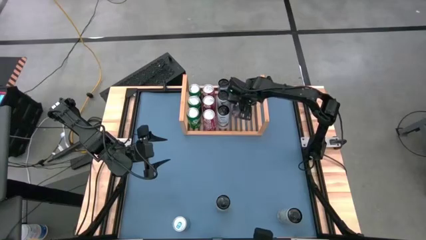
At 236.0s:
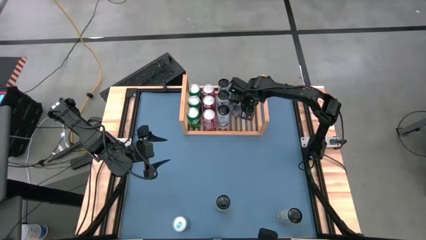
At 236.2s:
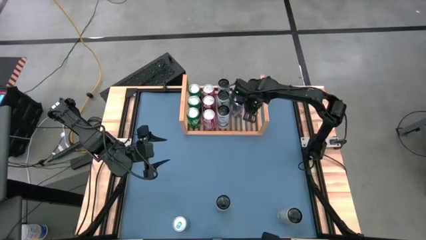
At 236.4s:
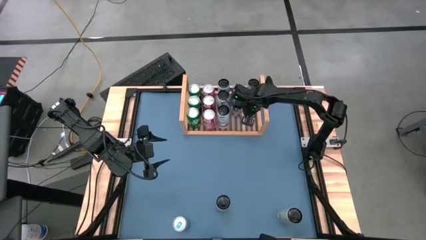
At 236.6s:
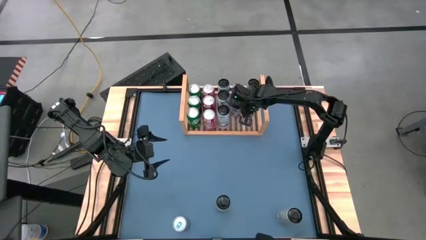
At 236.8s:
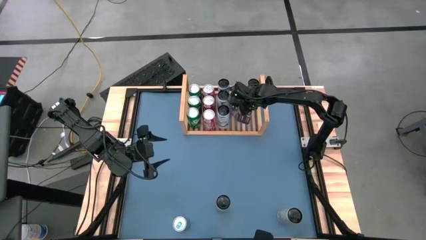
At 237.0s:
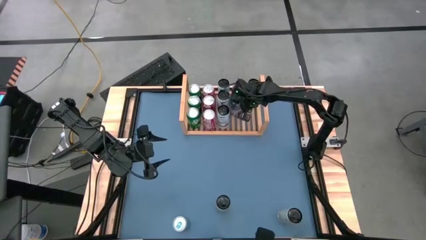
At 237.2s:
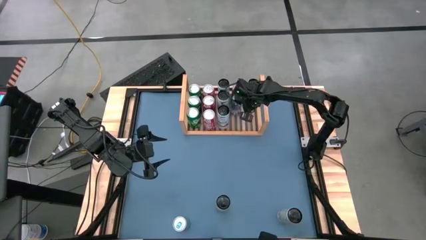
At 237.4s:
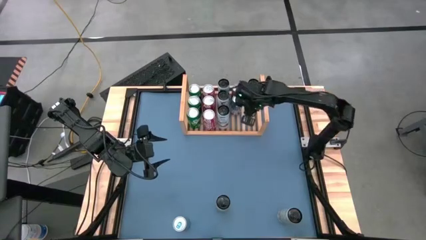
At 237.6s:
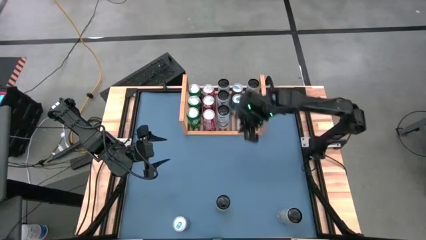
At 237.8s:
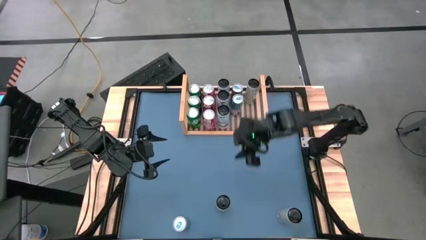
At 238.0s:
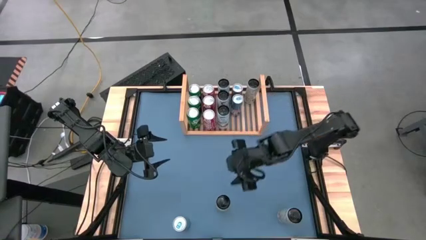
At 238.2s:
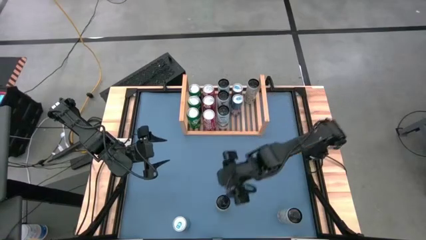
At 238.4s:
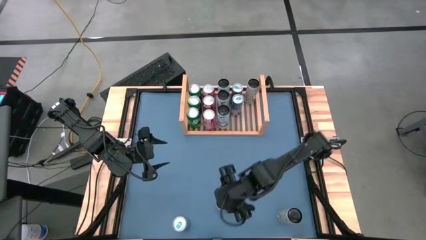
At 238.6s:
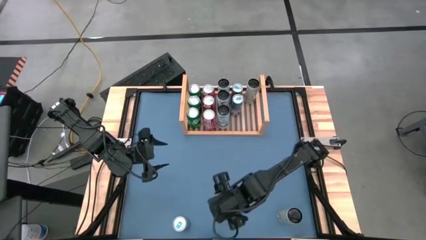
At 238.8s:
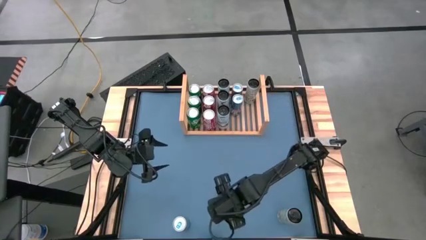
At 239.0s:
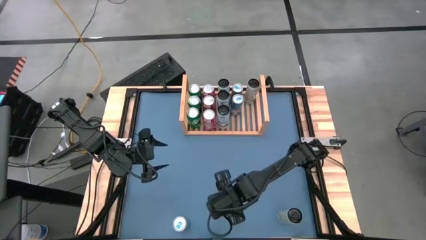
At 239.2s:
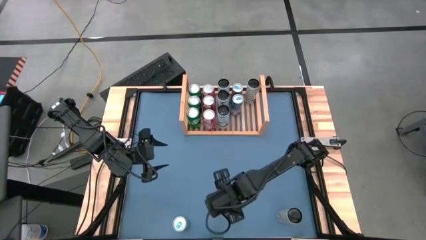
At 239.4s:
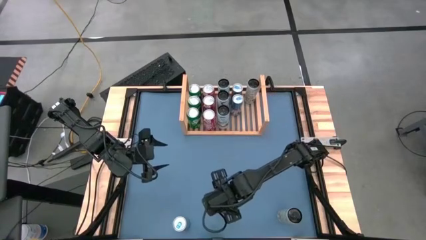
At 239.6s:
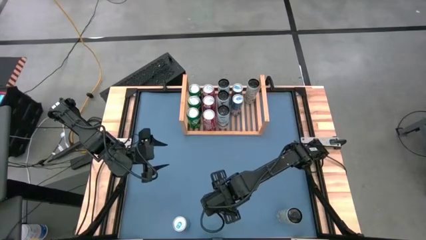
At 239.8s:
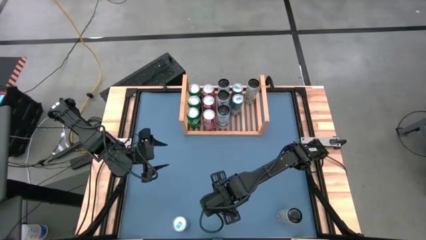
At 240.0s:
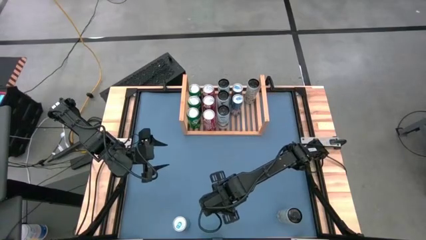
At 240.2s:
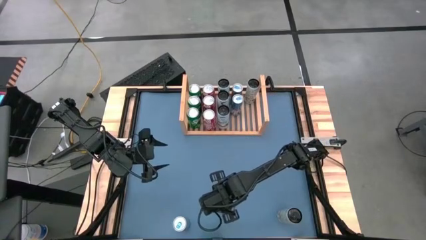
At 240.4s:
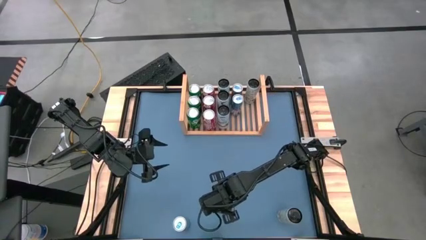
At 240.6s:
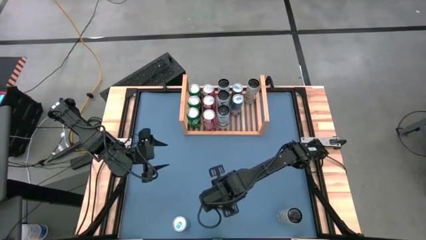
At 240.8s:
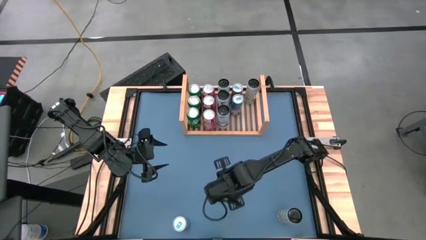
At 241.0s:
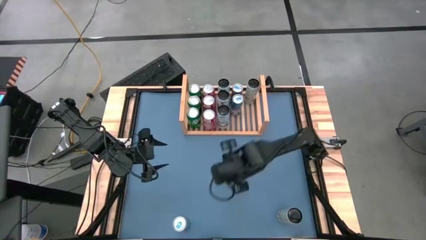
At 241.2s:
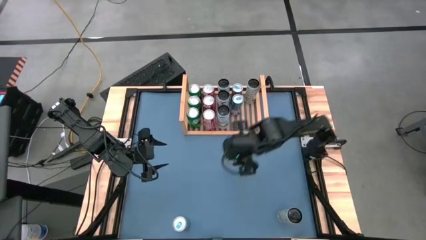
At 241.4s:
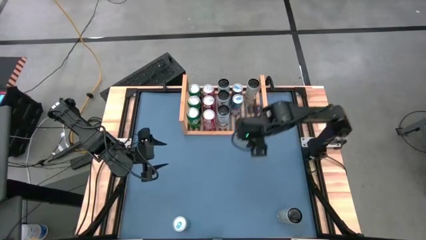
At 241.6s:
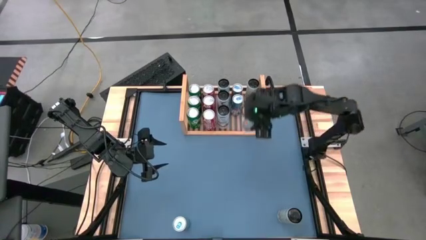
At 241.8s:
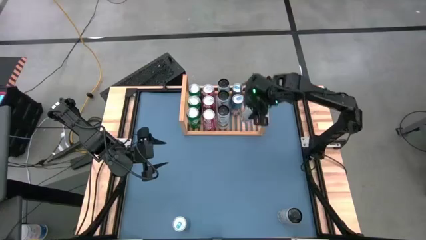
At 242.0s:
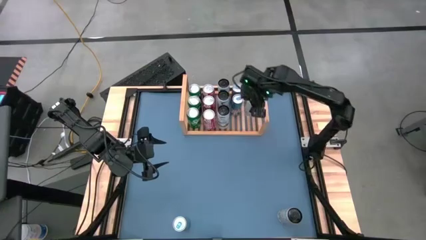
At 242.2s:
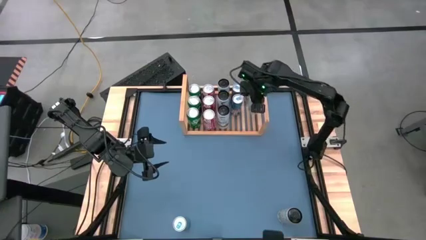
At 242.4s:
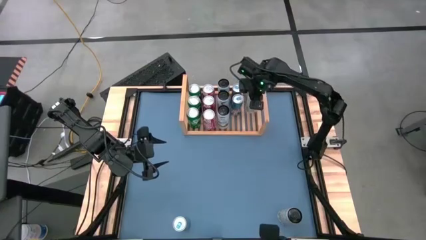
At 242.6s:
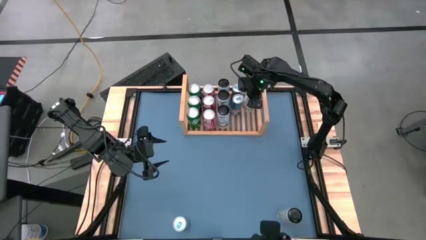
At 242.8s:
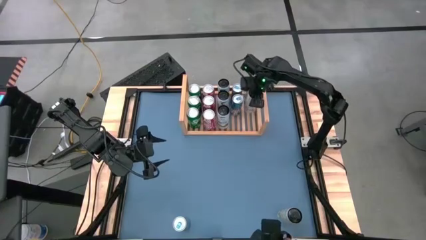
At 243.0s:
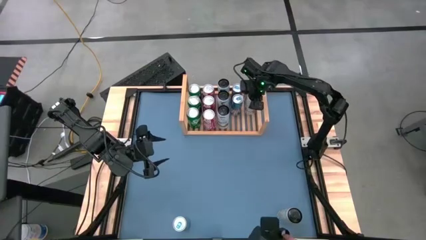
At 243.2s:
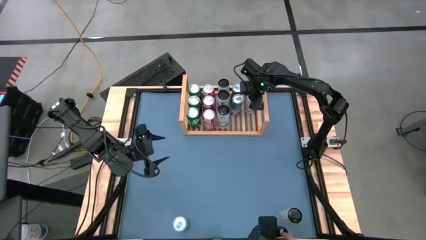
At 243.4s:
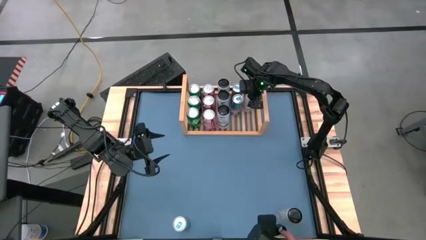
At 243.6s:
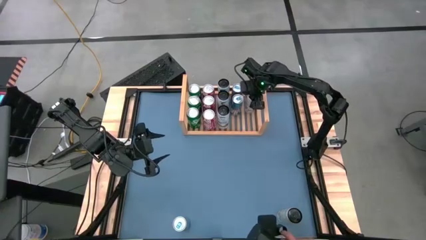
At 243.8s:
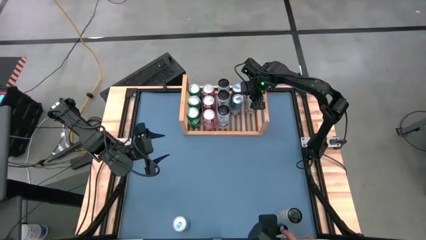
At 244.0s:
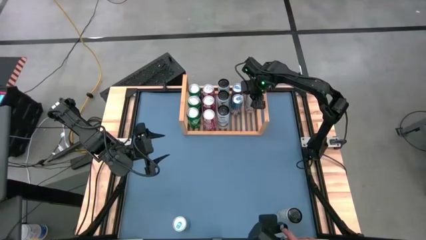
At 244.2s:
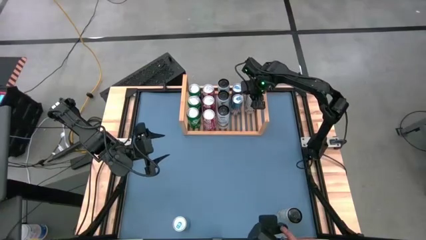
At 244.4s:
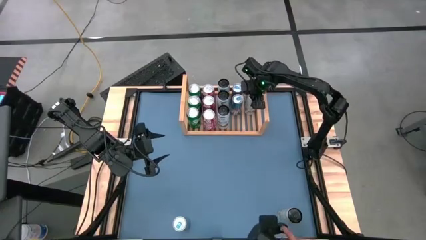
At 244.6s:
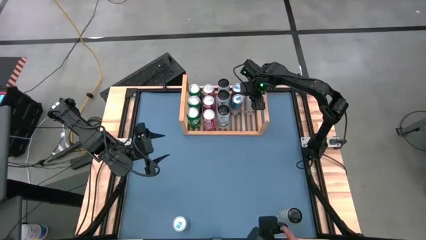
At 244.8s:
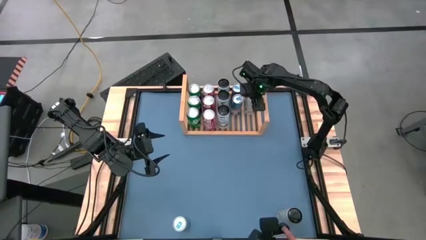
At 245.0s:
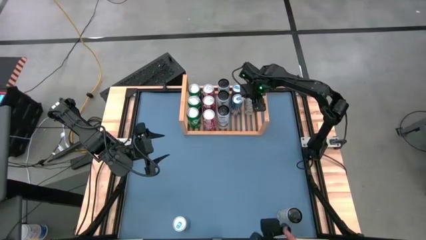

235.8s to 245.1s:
Task: Place canned beverage on shelf
Put the bottom middle white-yellow can aligned with the white yellow soda on the shelf

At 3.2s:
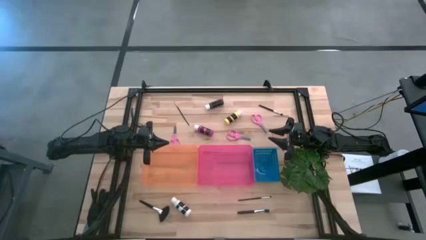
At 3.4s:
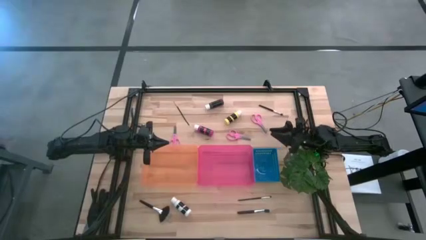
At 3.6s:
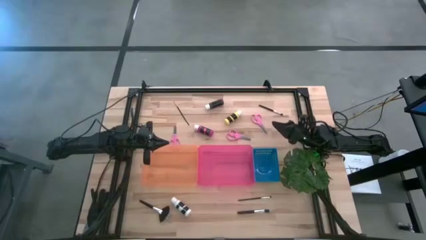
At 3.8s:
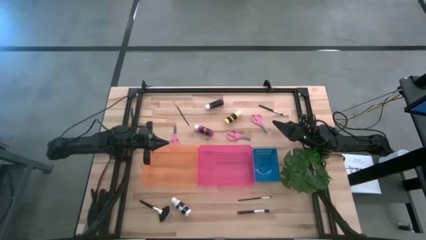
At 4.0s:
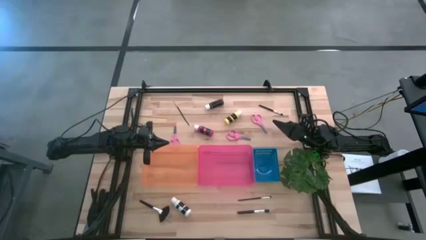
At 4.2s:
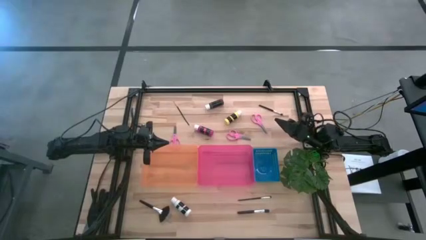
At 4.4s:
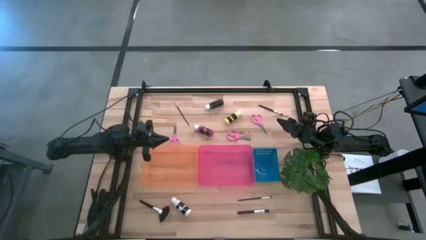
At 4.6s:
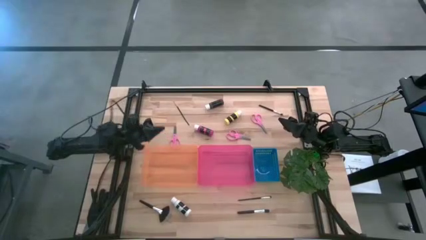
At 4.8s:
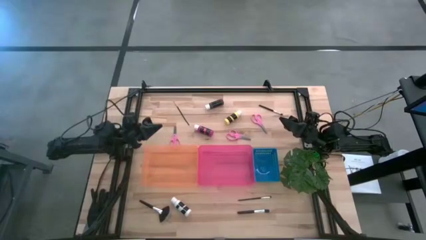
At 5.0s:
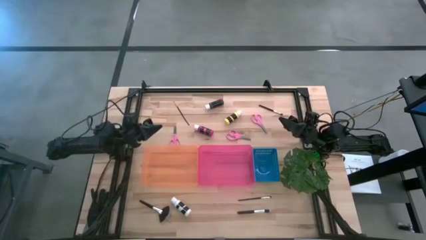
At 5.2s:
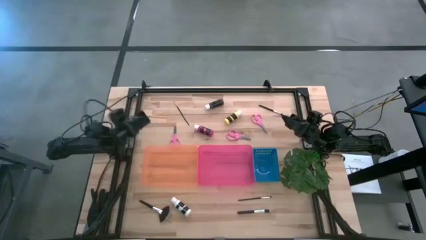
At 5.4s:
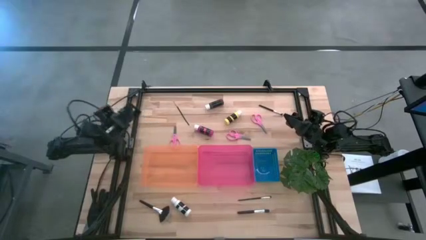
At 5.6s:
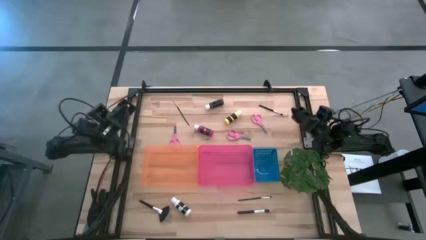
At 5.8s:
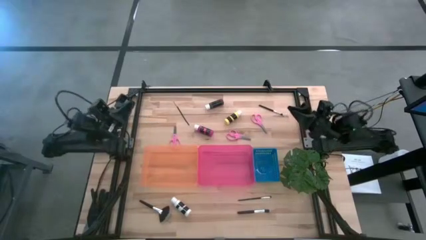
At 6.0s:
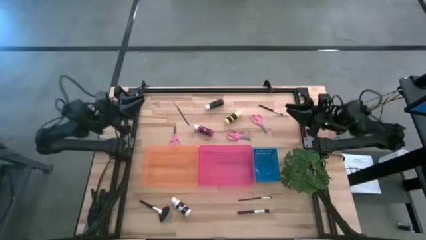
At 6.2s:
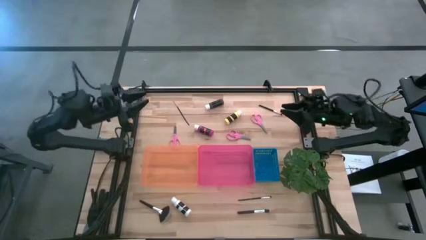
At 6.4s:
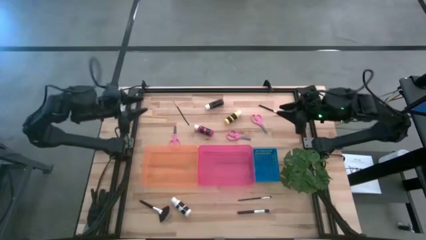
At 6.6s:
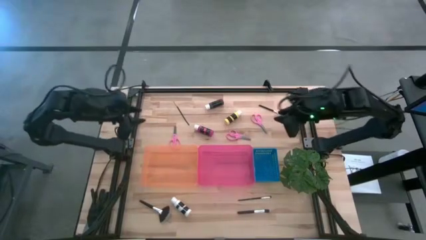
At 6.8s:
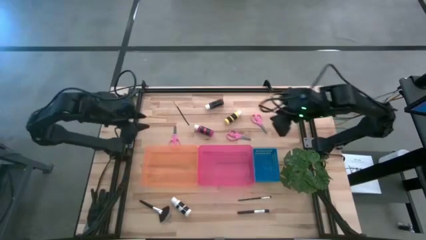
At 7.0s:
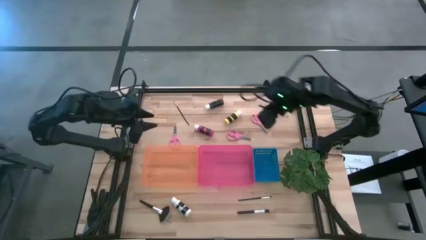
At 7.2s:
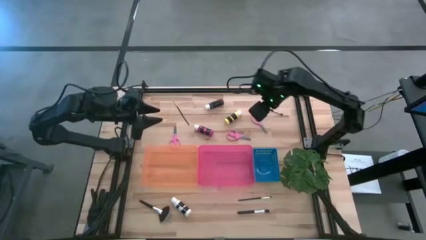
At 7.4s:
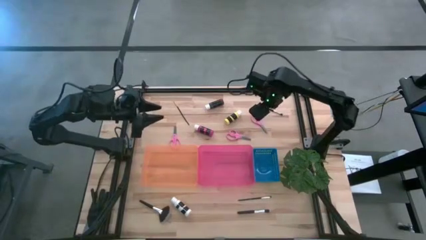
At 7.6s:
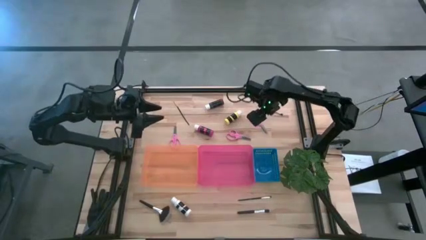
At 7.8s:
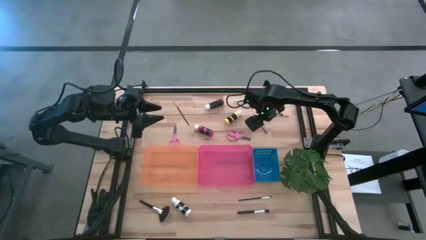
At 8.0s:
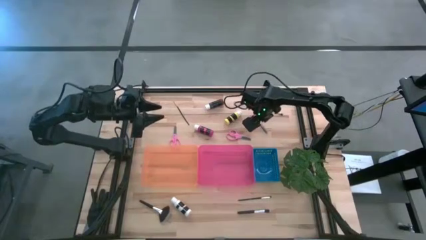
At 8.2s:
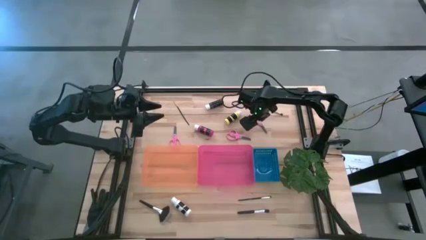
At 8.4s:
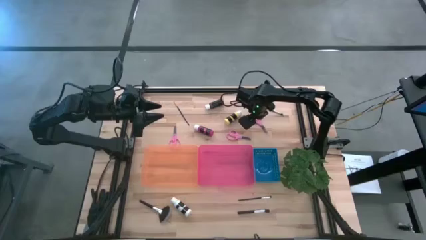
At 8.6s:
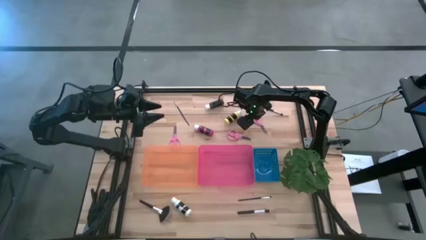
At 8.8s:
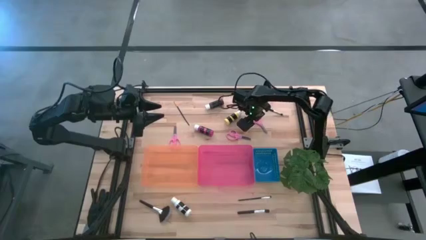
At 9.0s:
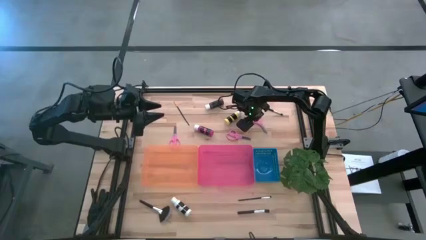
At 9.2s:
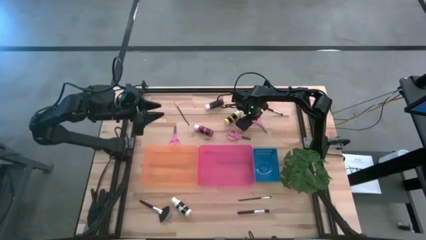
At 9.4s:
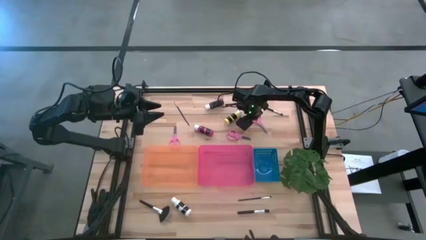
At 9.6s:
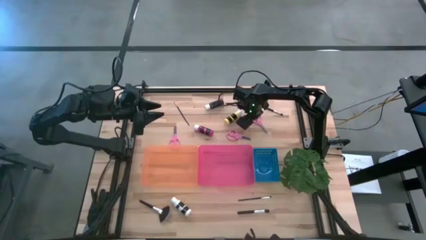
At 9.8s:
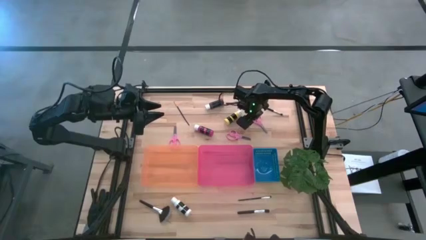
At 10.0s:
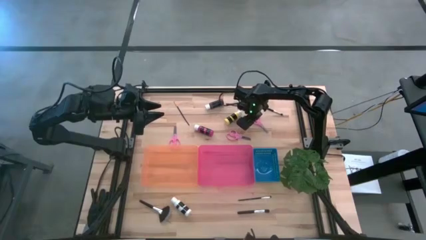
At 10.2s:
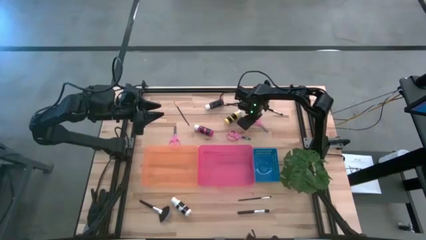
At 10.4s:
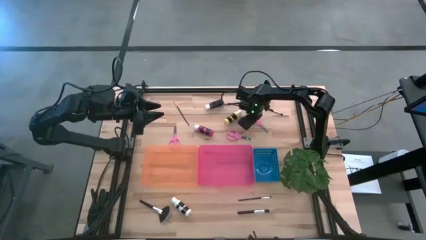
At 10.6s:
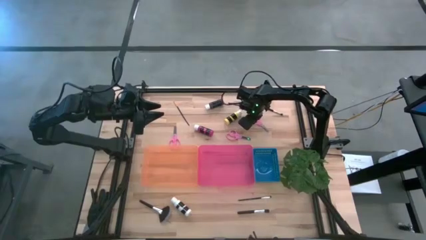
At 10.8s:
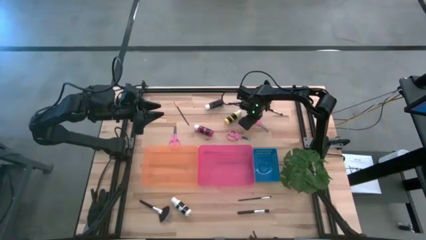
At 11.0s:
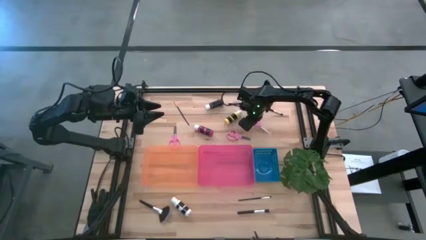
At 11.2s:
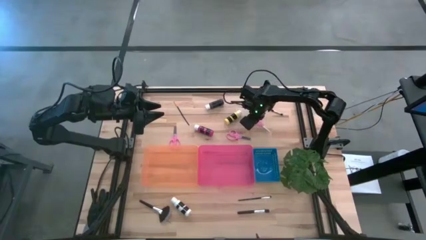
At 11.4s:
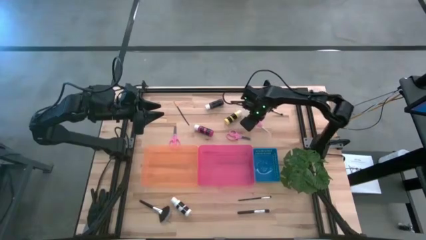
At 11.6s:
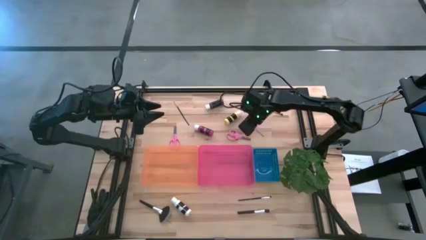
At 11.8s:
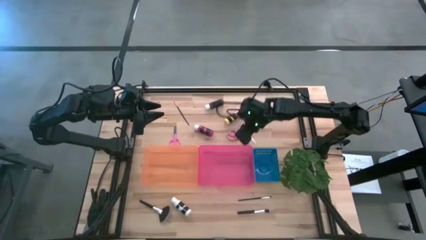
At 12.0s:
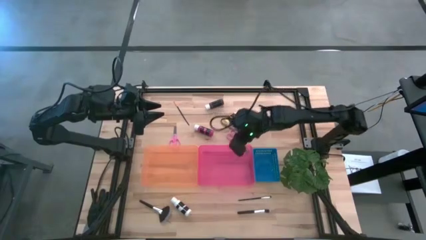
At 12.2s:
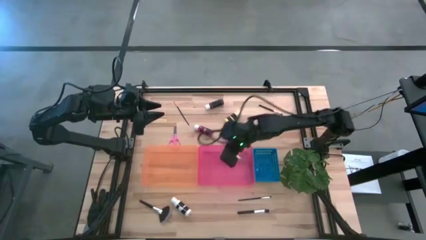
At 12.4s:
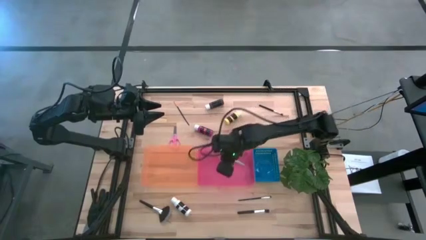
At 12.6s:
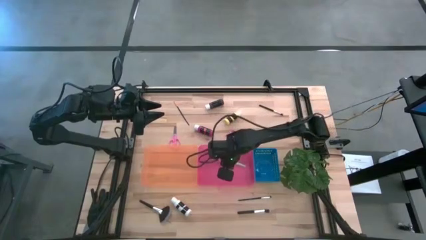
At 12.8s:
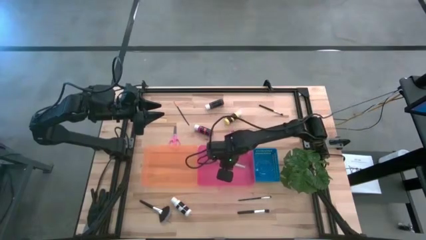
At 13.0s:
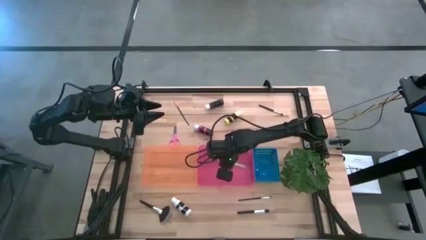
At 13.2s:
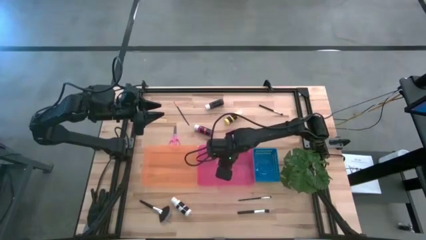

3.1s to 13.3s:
Task: Pick & Place Paint Supplies
Put the top pink scissors into the pink bin
